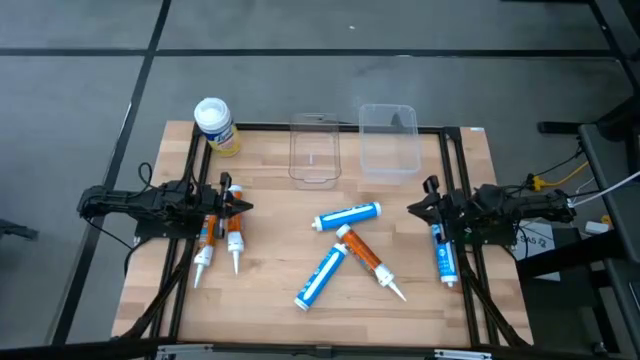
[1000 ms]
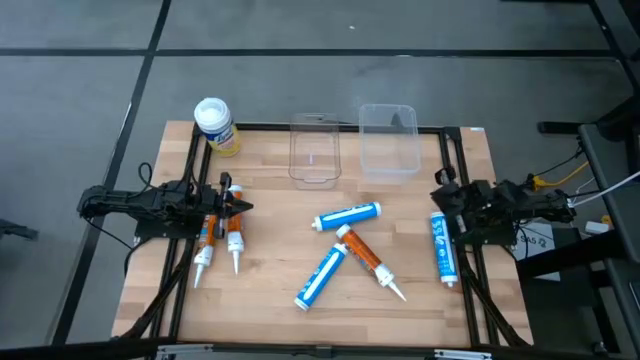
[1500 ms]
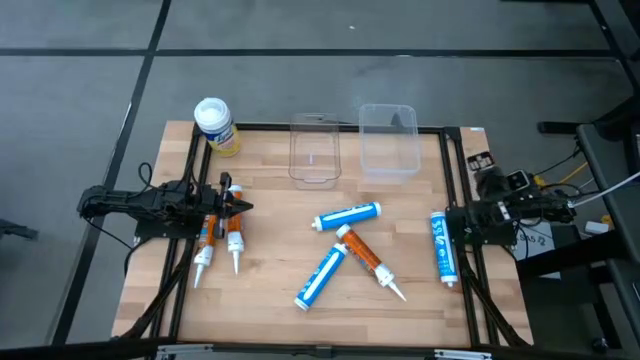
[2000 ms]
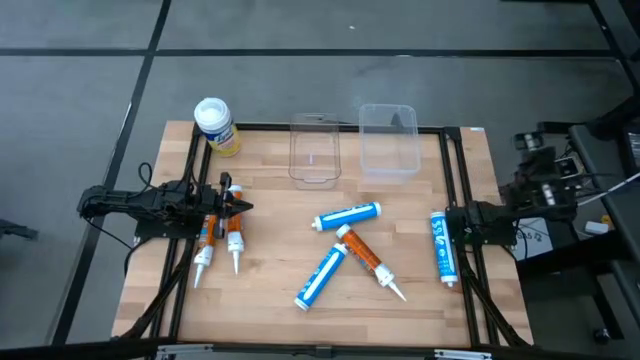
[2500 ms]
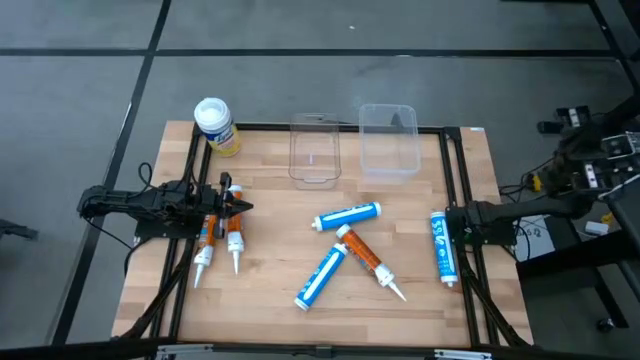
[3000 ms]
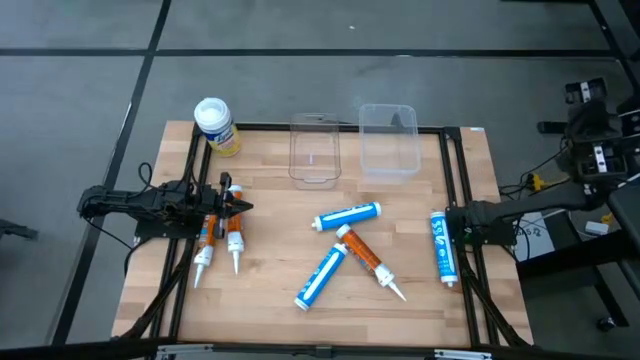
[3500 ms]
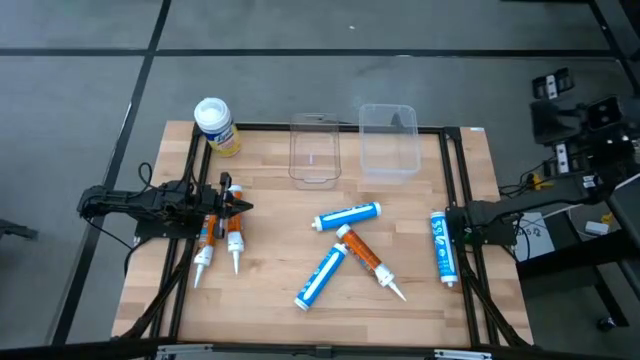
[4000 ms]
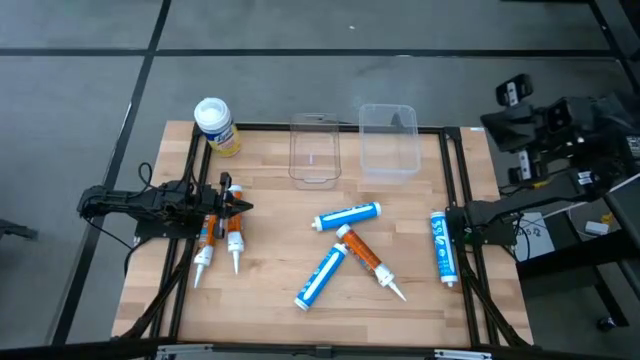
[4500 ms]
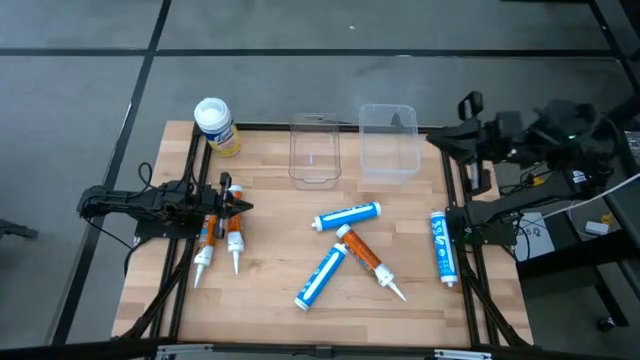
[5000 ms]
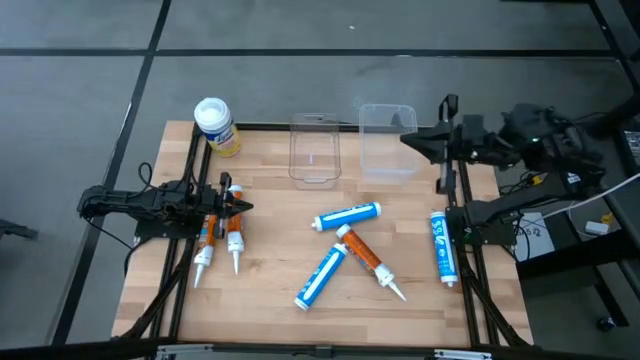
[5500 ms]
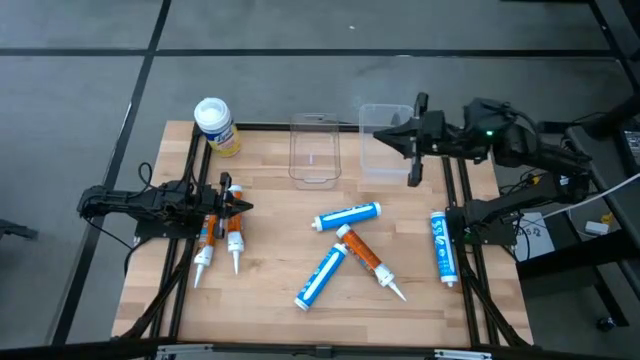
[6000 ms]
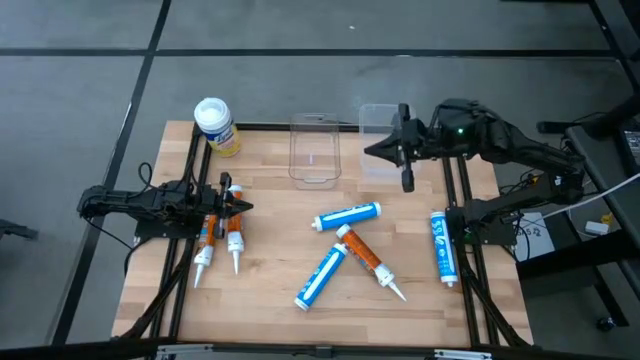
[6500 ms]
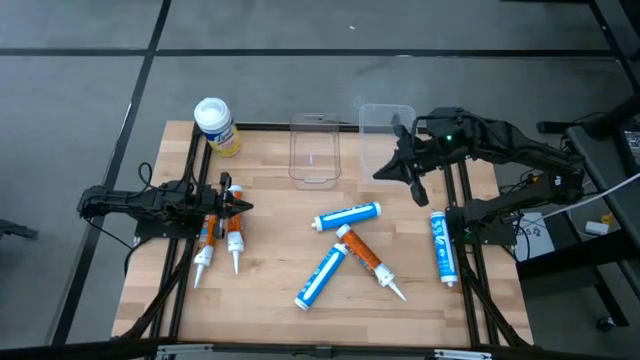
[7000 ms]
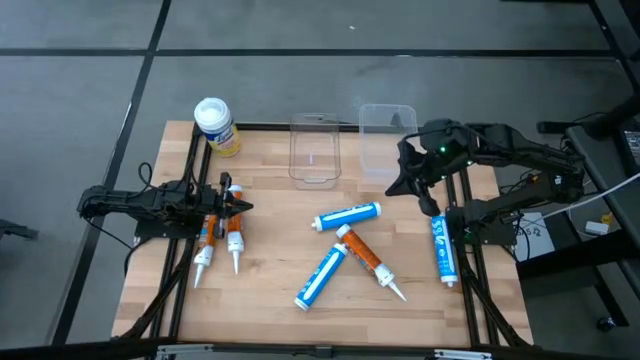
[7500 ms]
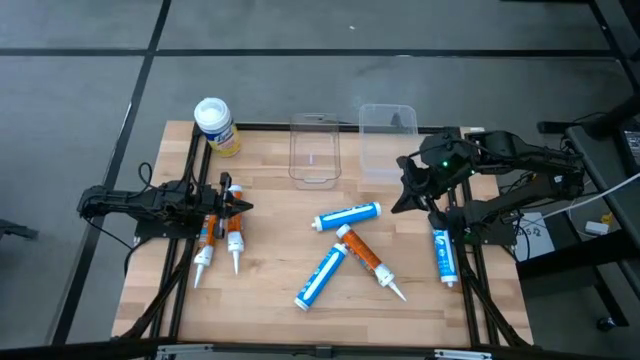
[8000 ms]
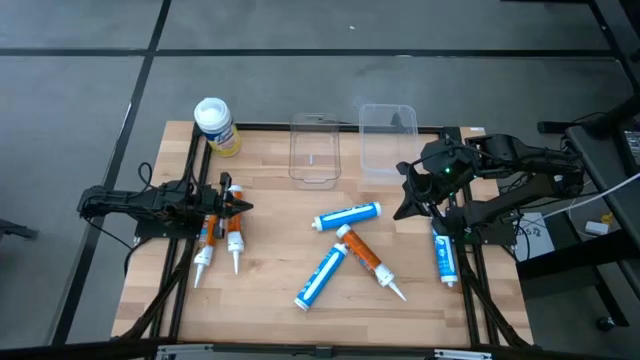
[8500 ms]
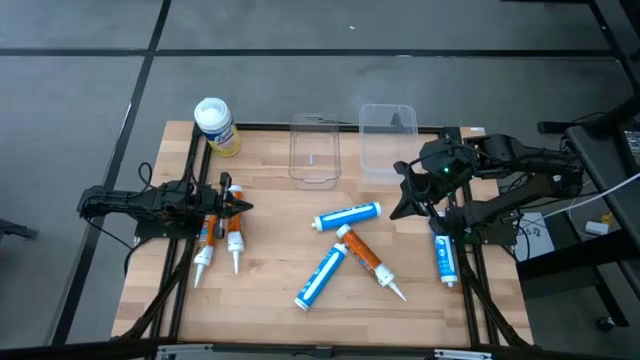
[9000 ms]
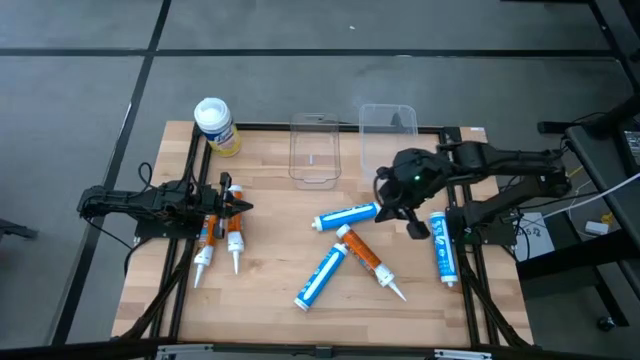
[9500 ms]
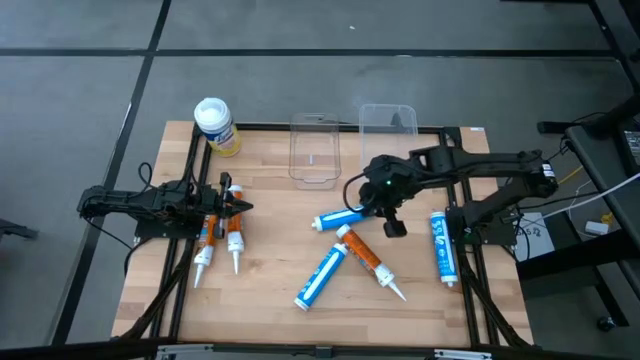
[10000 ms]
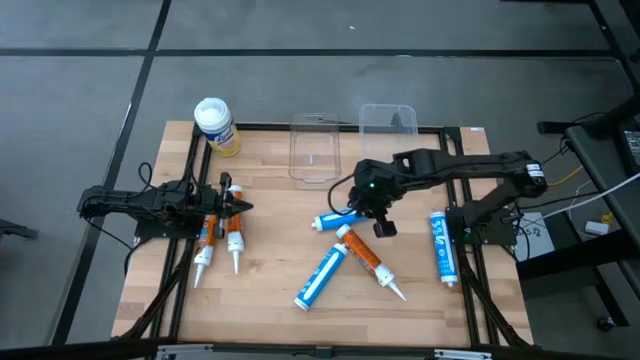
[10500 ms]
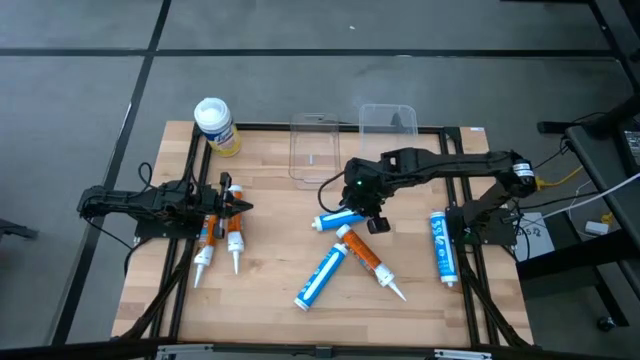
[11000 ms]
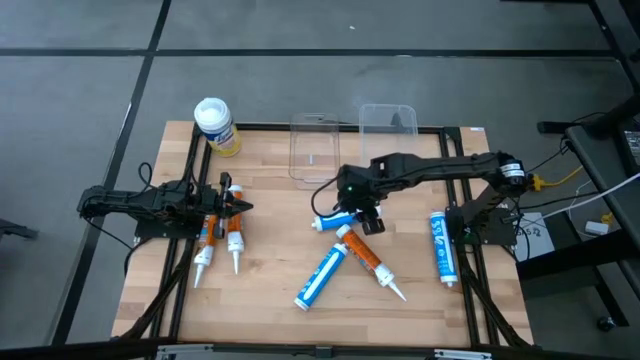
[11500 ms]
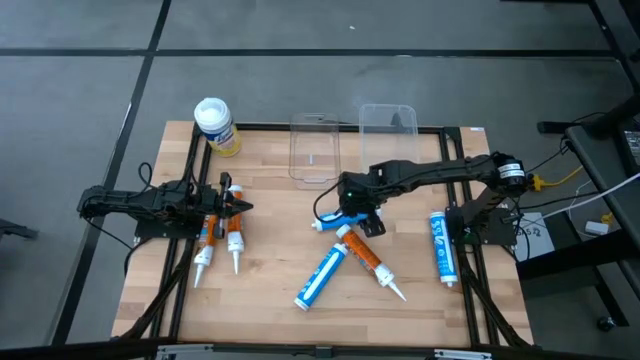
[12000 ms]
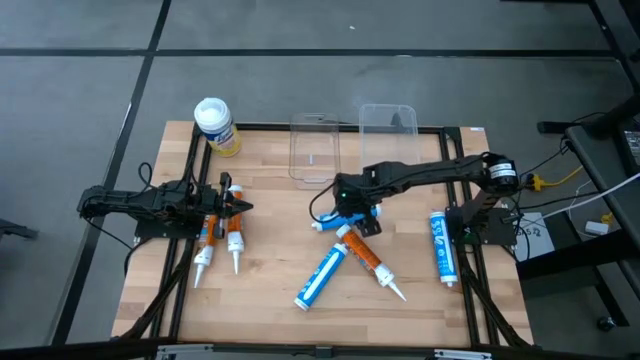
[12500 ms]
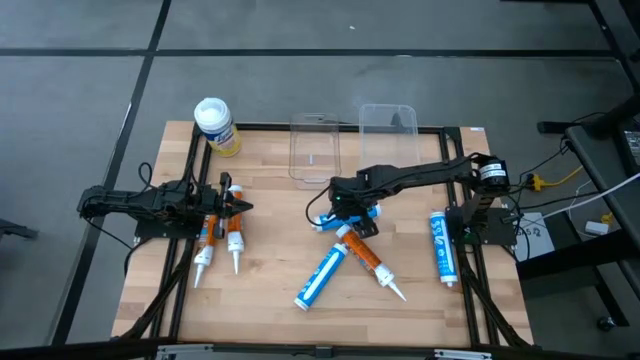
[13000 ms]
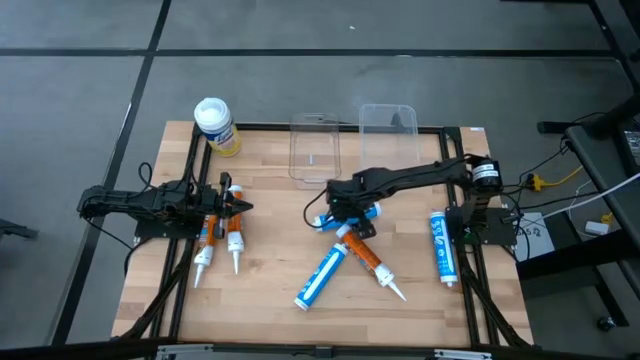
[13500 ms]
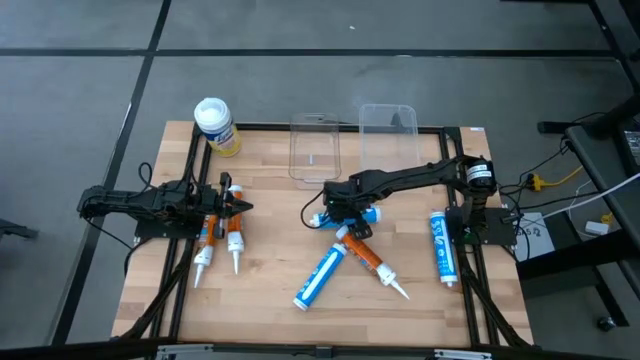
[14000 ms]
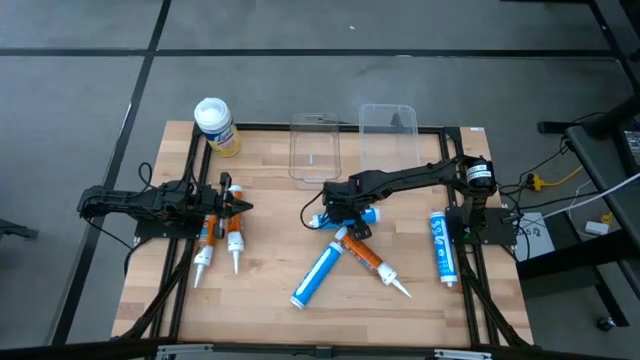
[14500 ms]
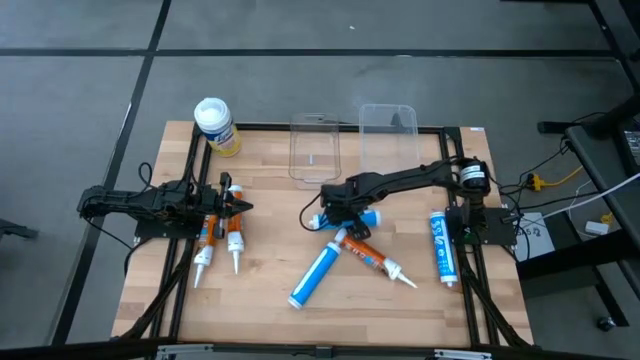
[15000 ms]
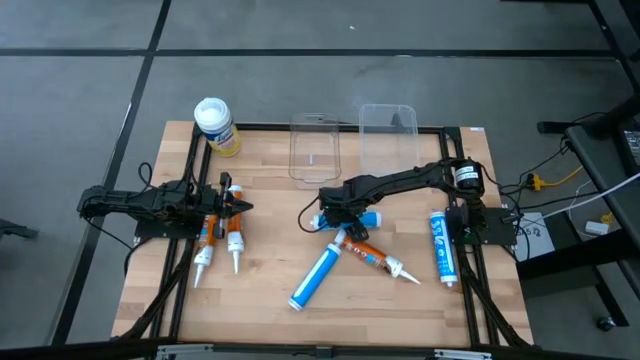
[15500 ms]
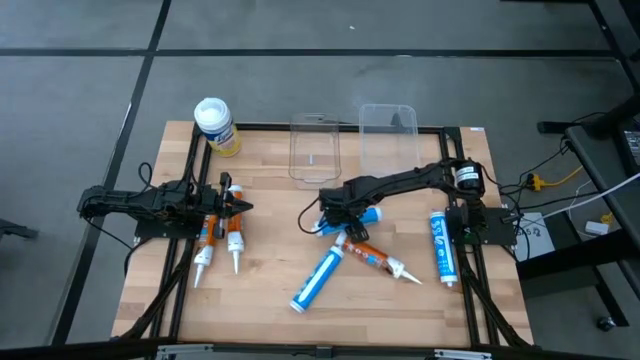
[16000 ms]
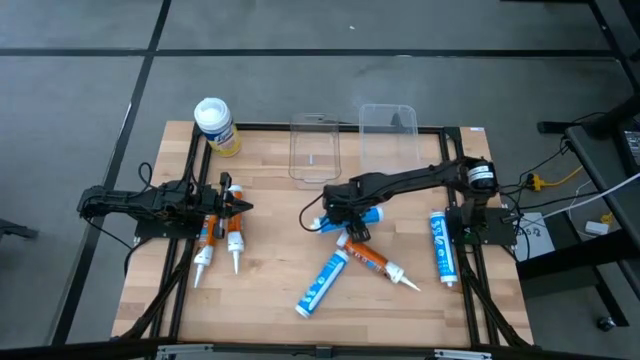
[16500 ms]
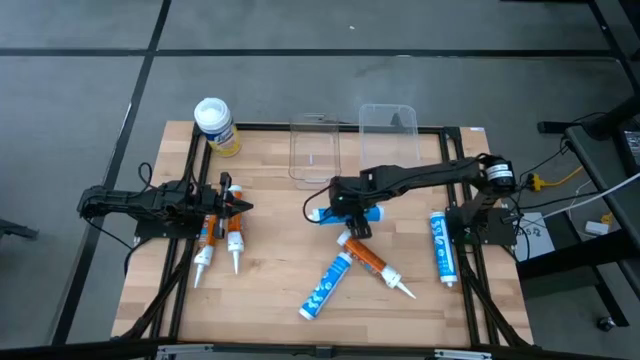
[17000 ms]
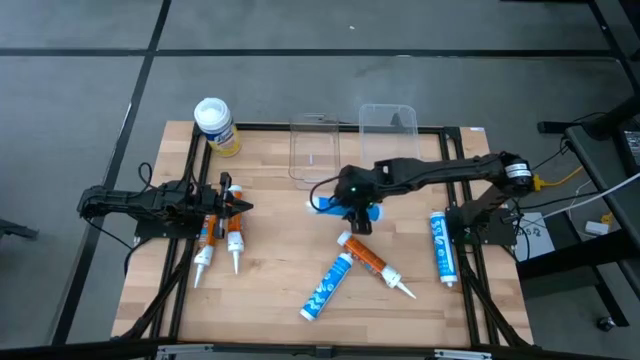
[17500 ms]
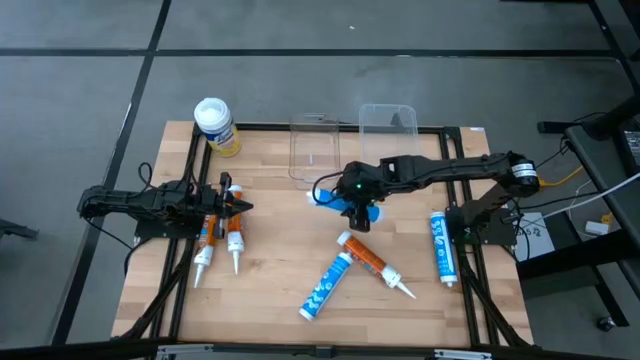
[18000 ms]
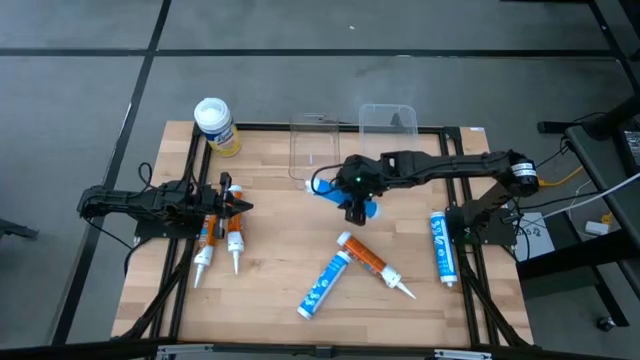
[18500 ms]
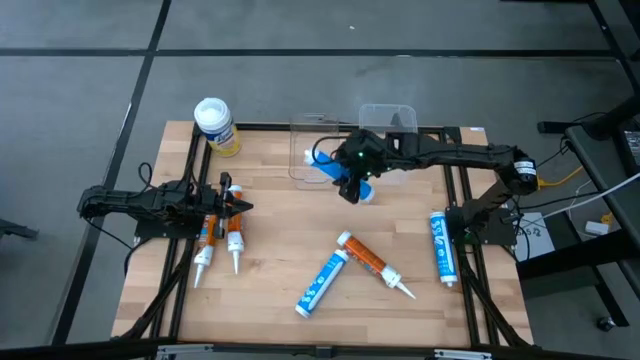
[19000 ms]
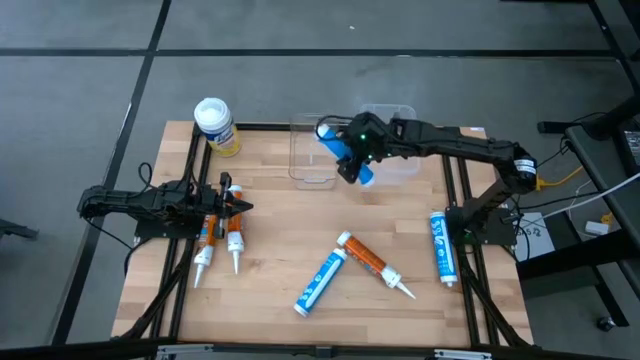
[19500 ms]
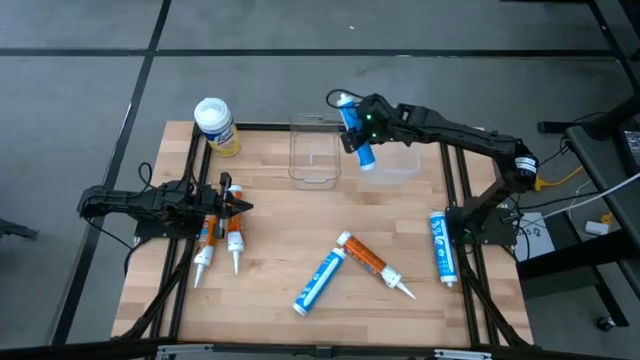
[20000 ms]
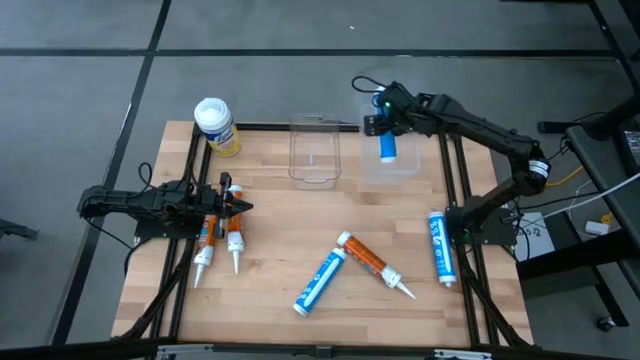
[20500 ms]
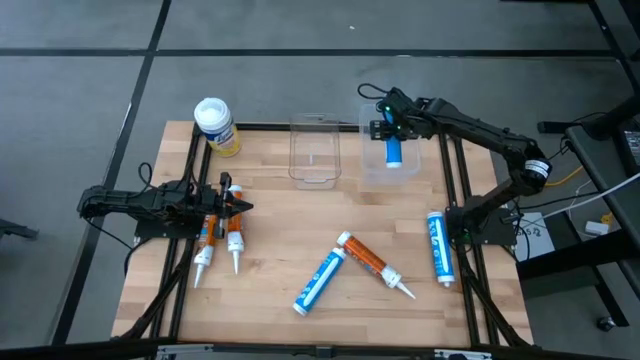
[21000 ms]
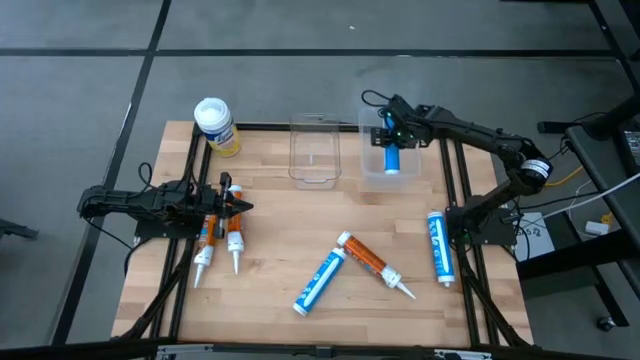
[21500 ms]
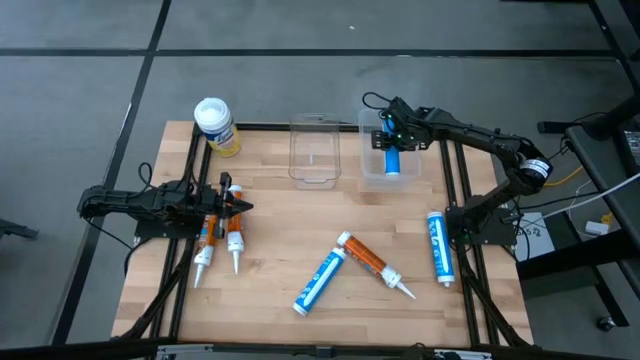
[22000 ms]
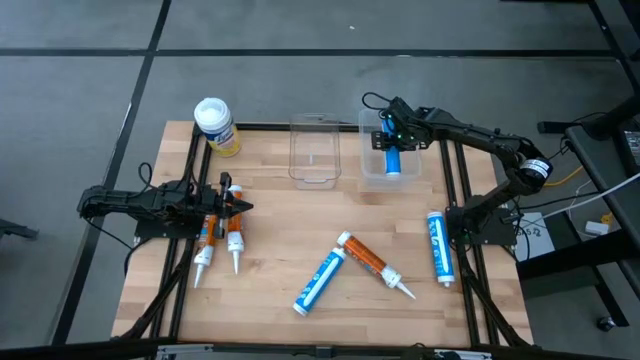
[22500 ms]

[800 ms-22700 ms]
Task: Pick & place silicon tubes, Sealant and Lysol wipes
Put the top blue sealant into the right transparent bin
